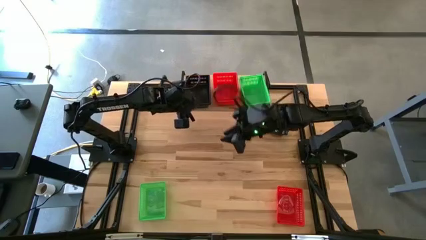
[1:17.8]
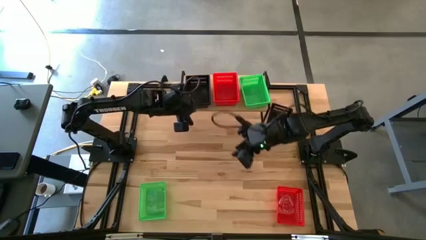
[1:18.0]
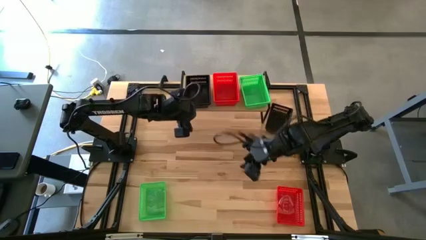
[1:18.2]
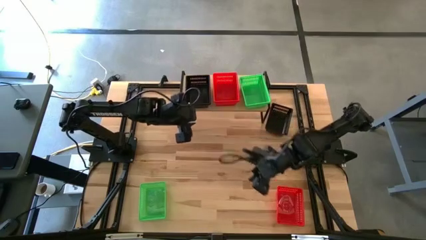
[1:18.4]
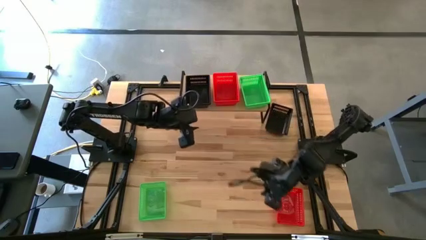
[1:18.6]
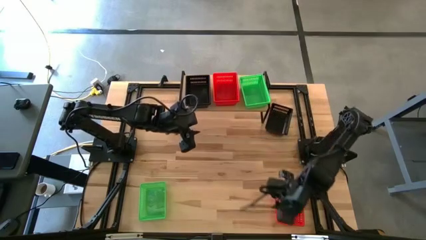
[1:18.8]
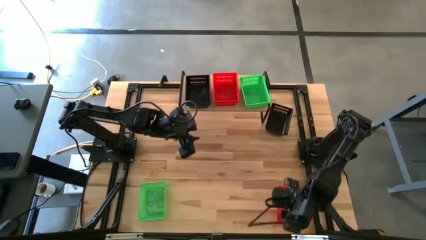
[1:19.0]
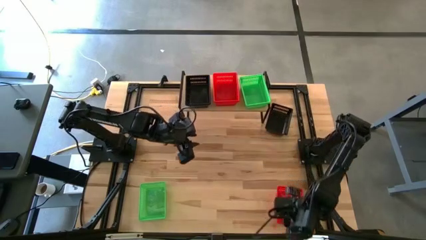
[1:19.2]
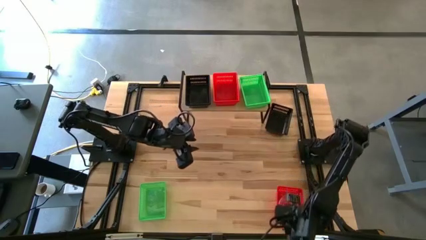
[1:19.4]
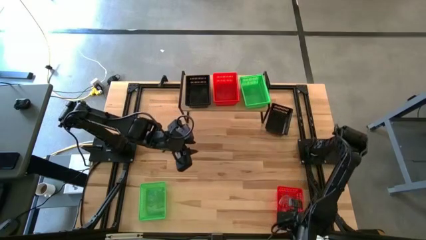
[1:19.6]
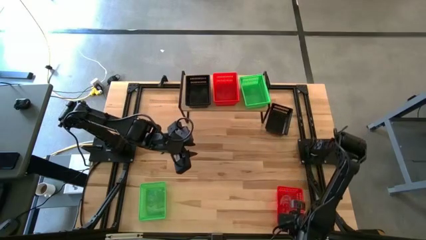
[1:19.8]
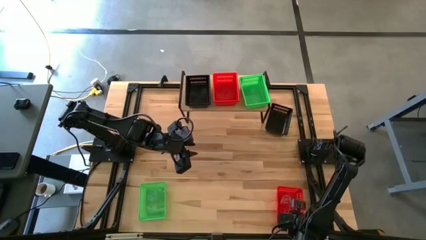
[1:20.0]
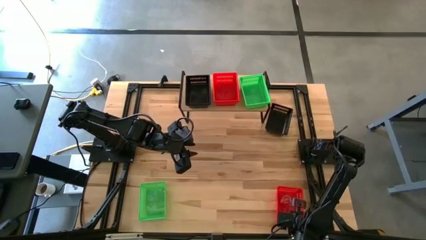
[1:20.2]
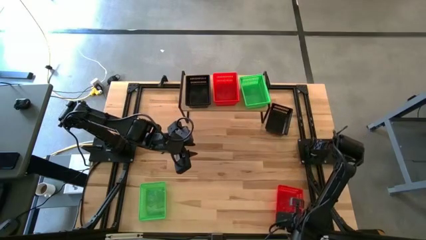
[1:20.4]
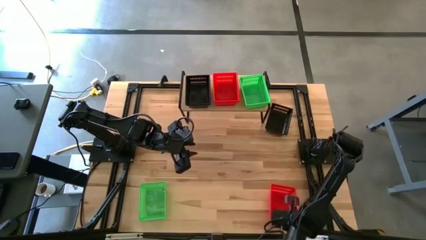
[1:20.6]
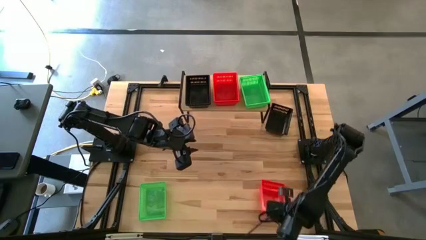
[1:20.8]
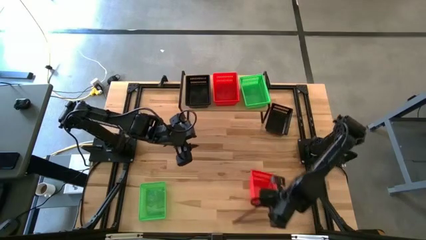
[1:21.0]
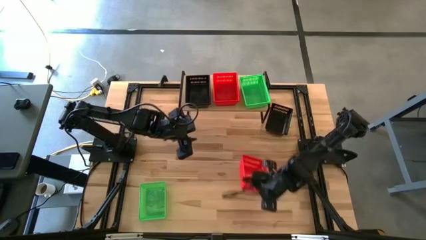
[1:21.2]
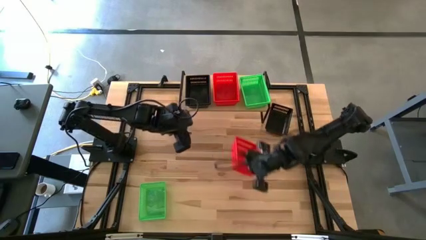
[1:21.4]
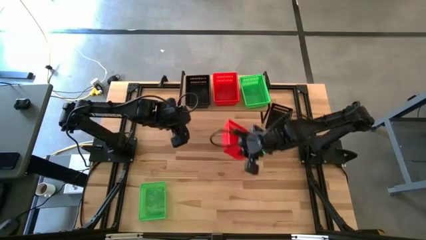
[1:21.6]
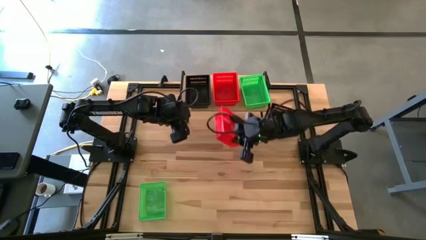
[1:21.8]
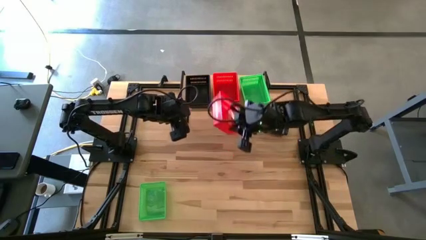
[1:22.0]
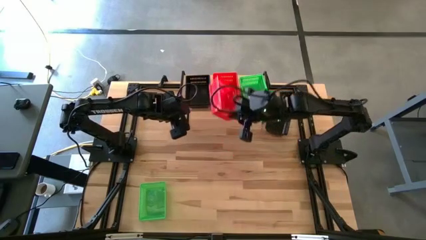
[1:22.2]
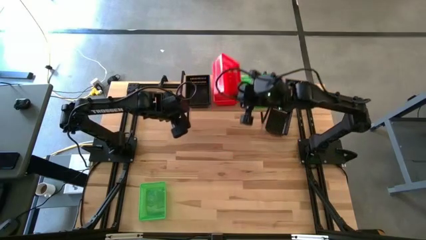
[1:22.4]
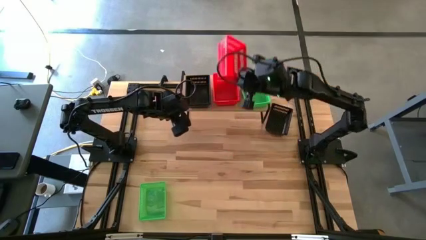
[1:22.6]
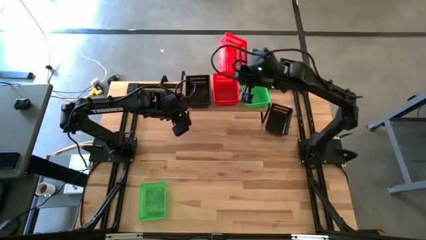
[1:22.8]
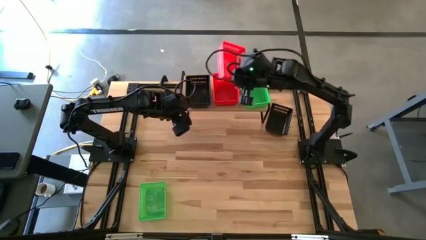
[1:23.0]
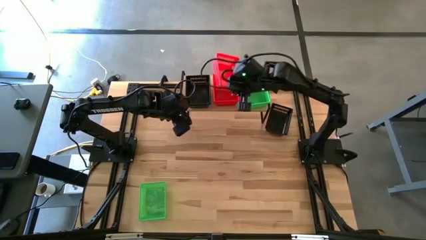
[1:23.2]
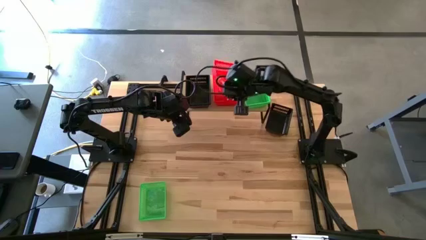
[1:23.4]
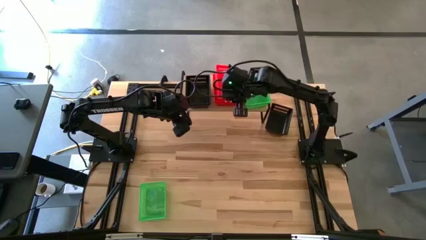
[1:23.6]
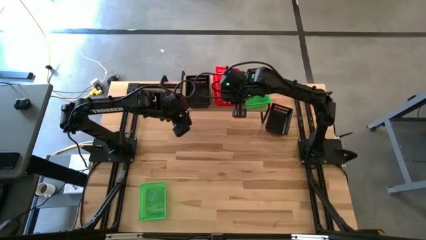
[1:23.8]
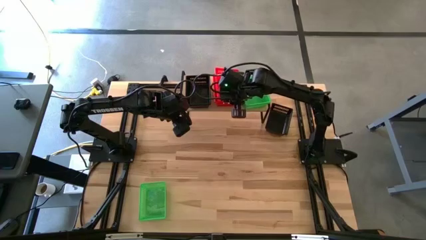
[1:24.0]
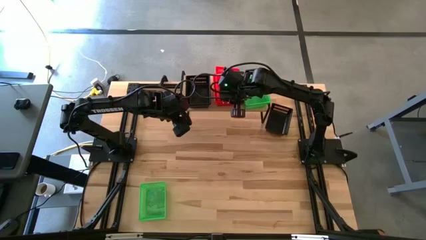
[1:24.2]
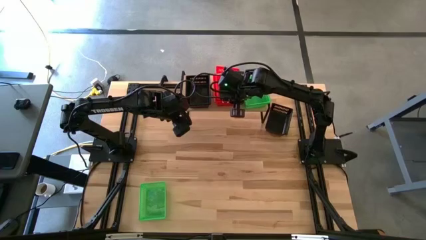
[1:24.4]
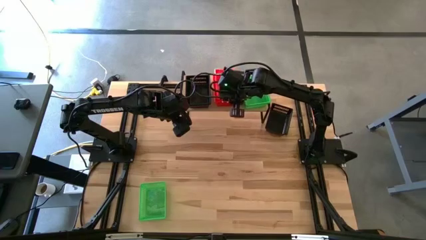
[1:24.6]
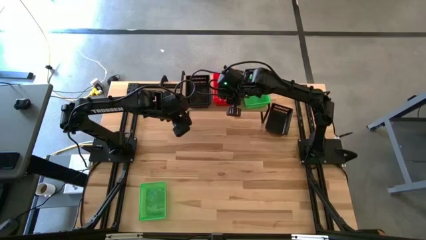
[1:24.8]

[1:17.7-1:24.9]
Task: Stack baskets on shelf by color
Stack the red bin on the stacked red bins on the shelf

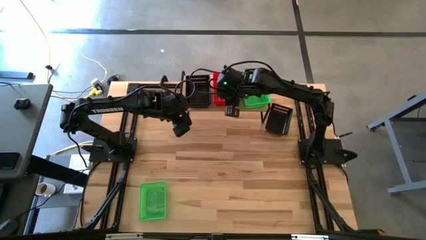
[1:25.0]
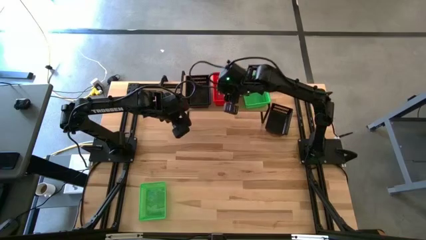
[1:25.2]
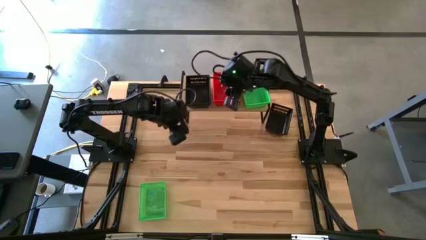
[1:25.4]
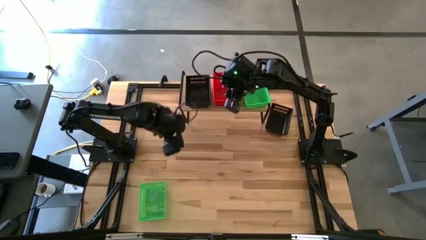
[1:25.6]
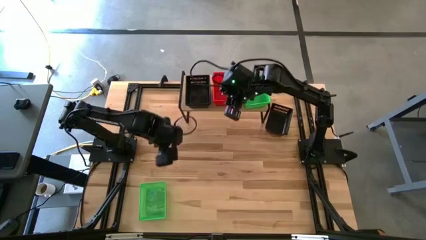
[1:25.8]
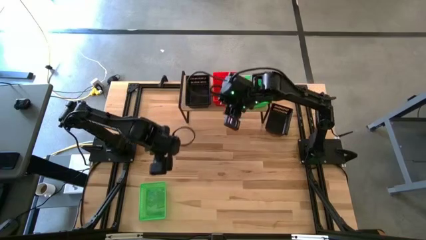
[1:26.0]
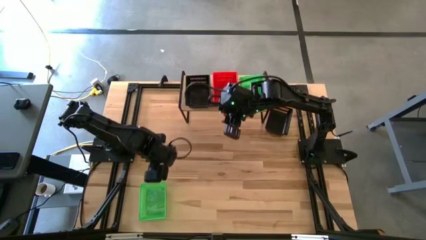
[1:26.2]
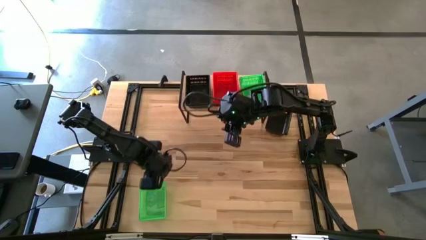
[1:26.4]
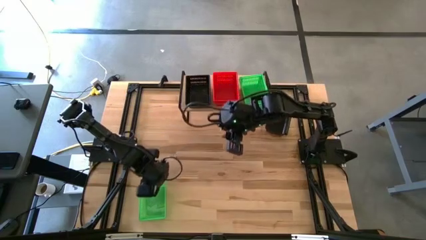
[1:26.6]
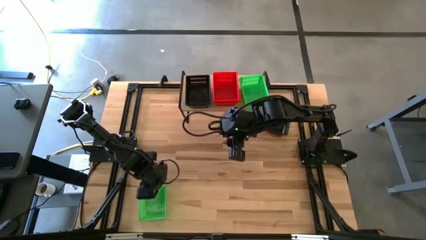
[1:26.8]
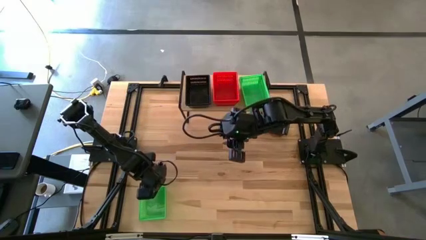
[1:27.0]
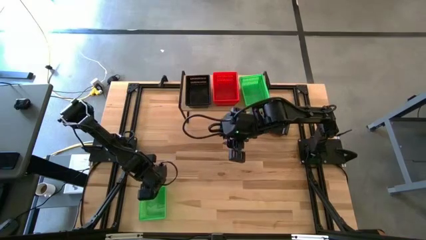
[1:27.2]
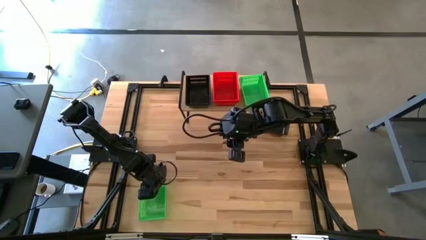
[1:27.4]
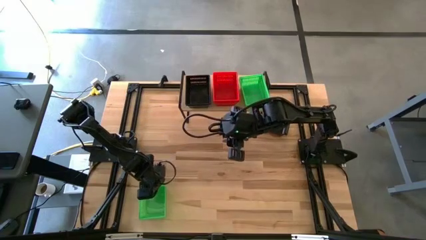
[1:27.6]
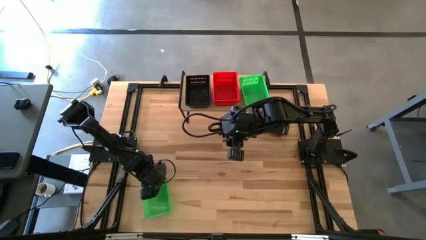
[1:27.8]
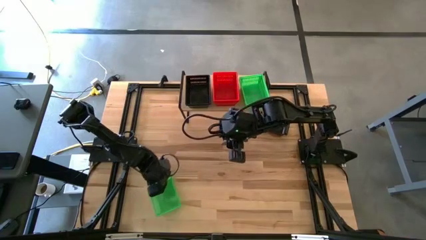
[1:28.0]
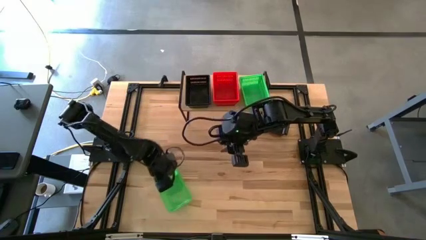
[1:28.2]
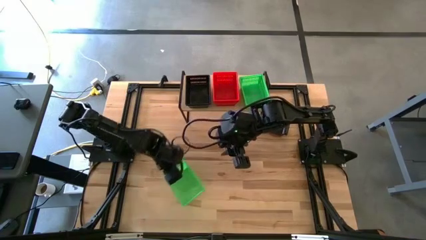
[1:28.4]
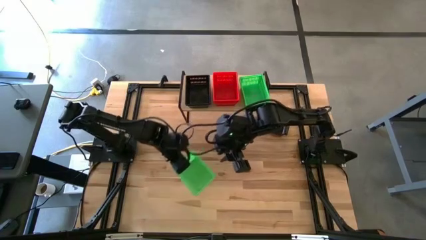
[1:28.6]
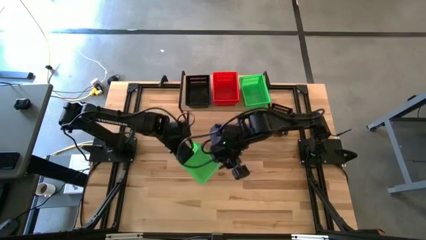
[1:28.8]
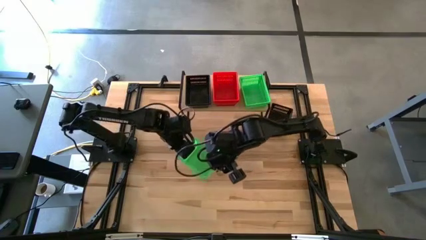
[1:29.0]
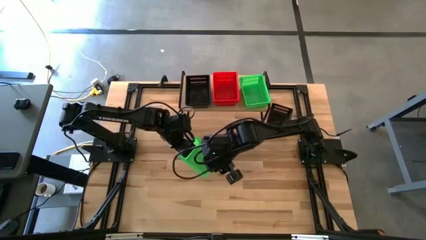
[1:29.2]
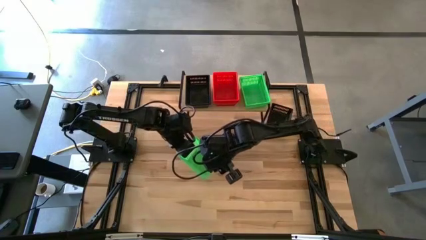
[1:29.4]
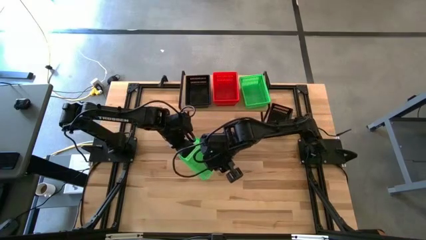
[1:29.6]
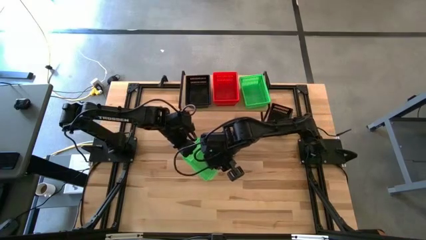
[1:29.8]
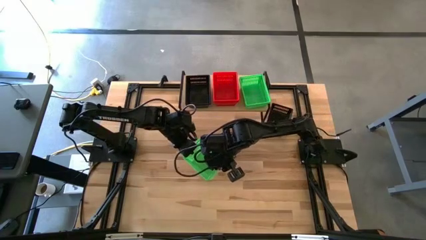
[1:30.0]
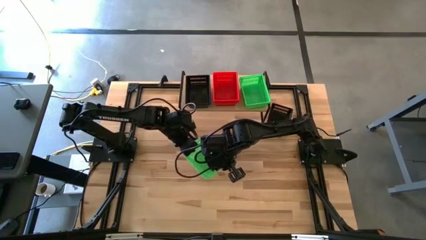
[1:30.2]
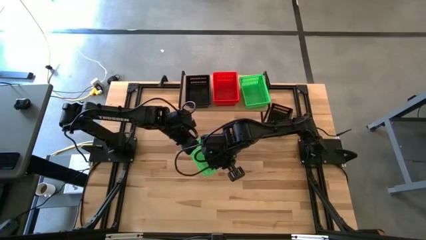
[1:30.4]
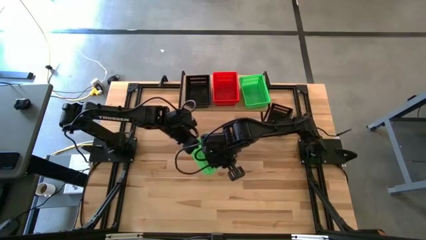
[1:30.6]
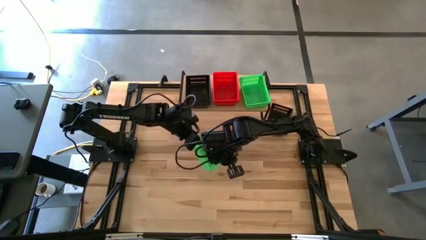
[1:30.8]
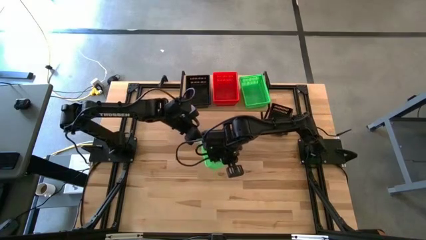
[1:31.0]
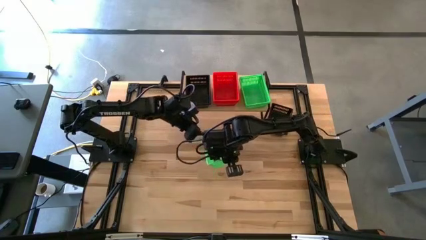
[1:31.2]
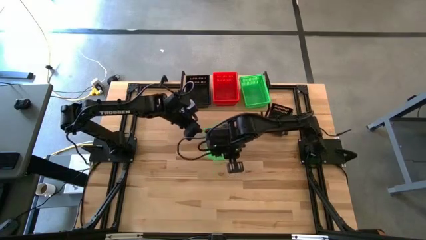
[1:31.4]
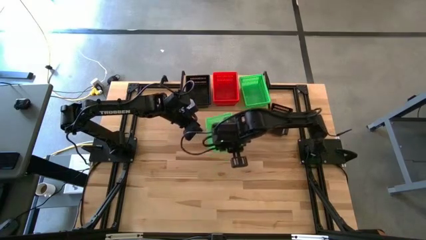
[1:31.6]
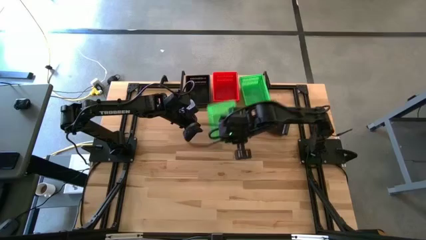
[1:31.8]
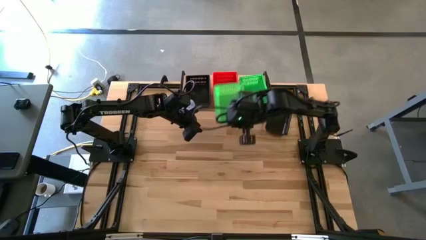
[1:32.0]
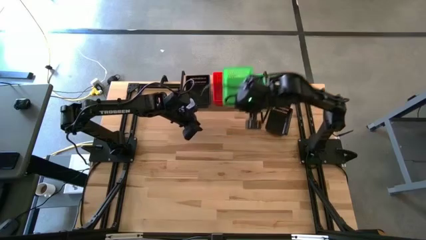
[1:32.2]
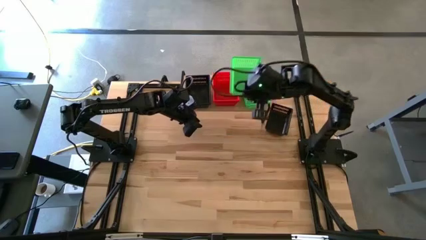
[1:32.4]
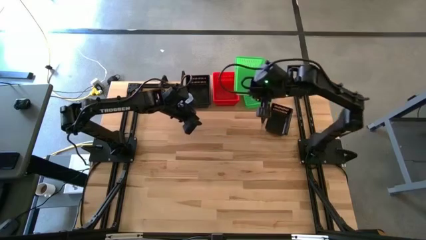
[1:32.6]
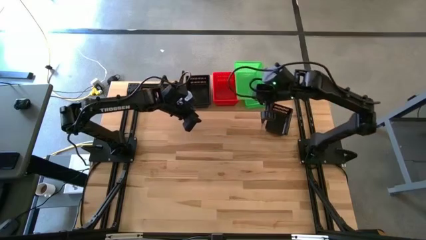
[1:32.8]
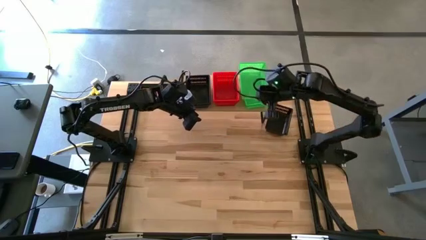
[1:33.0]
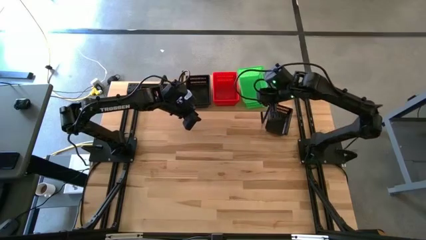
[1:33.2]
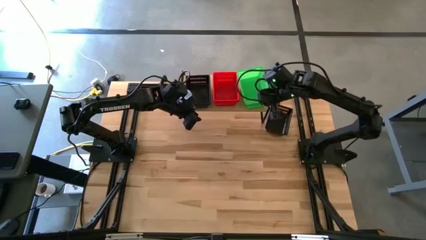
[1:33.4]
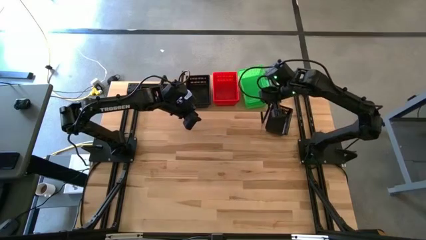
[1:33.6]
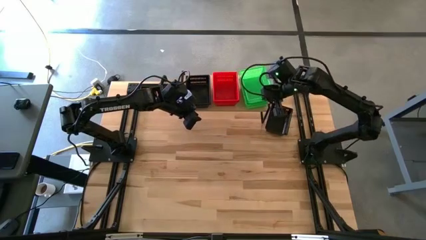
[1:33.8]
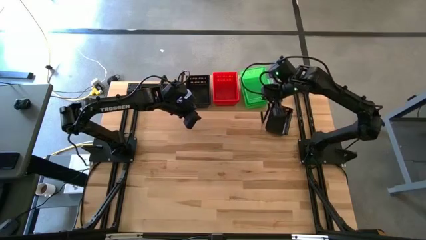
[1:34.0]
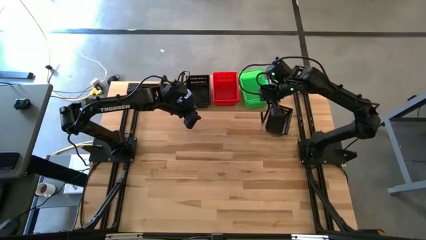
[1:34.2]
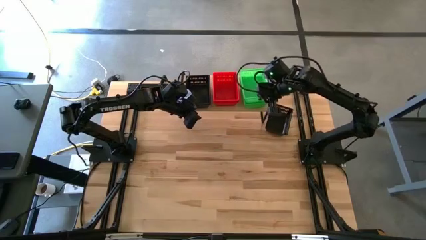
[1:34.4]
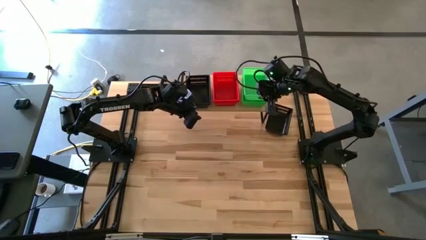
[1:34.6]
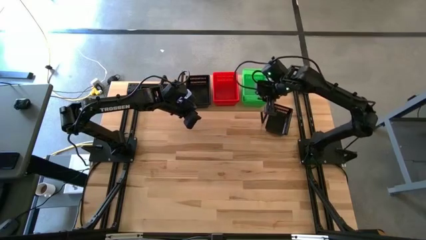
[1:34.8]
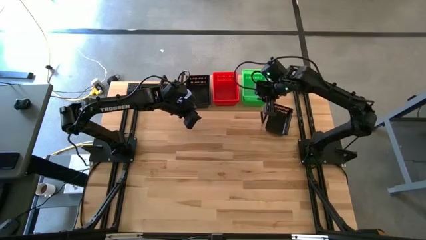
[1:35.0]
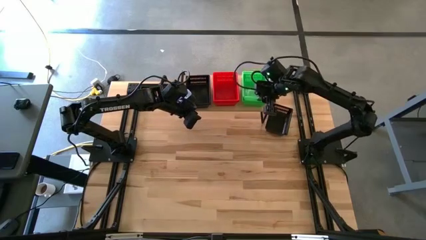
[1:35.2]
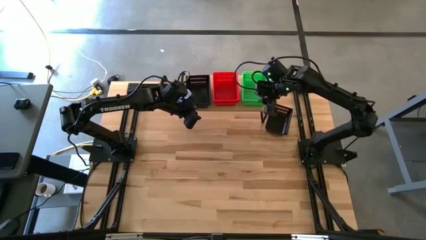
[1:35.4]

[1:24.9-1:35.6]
Stack the green bin on the stacked green bins on the shelf
